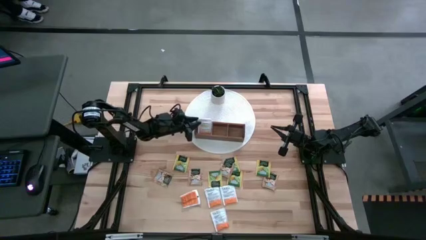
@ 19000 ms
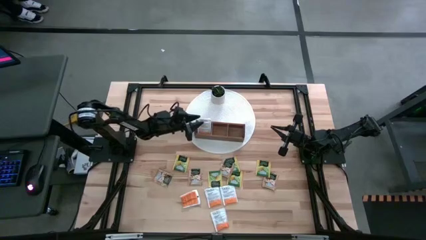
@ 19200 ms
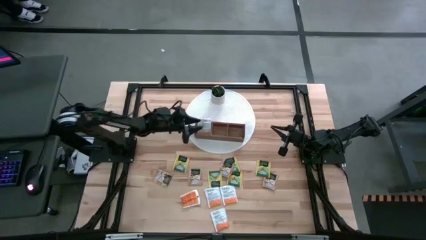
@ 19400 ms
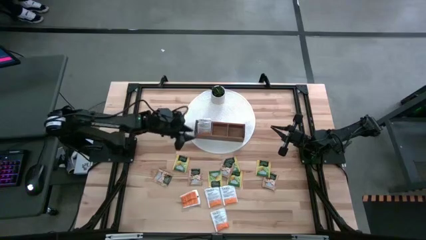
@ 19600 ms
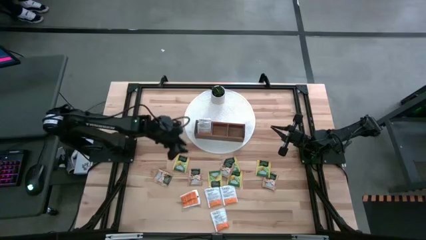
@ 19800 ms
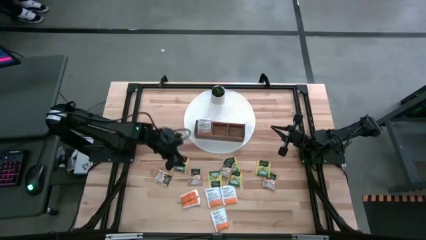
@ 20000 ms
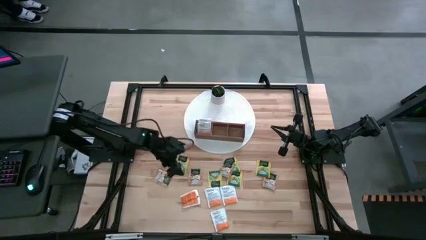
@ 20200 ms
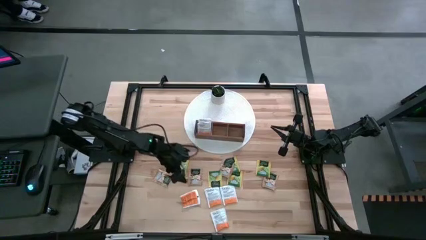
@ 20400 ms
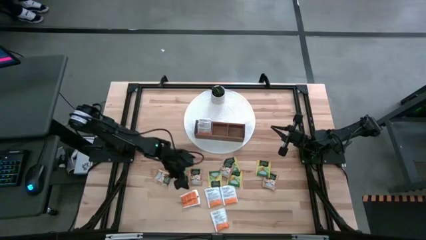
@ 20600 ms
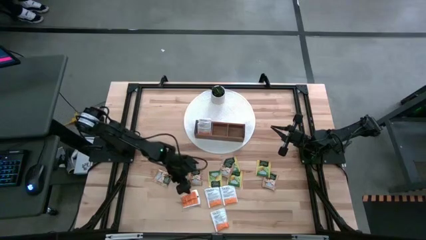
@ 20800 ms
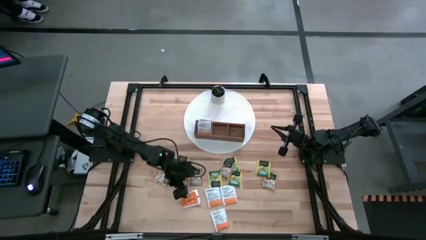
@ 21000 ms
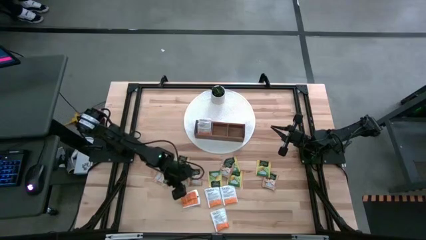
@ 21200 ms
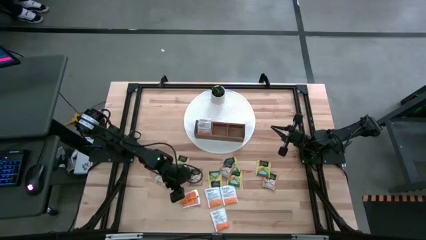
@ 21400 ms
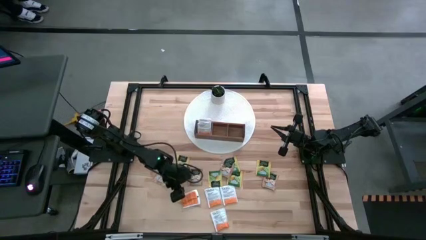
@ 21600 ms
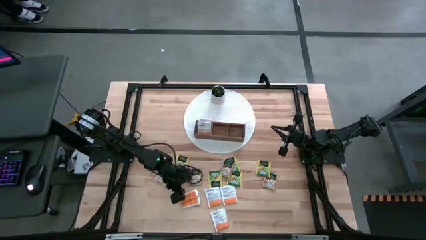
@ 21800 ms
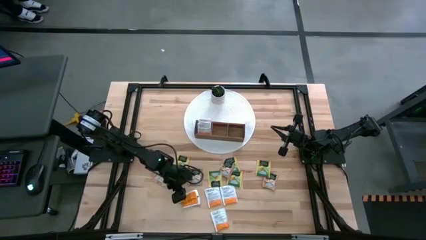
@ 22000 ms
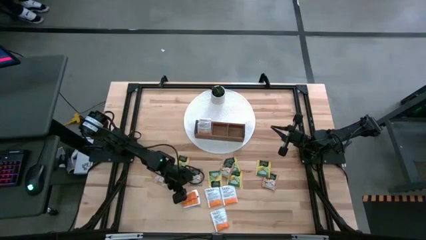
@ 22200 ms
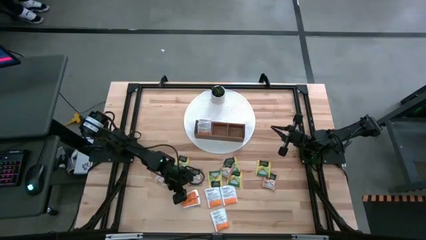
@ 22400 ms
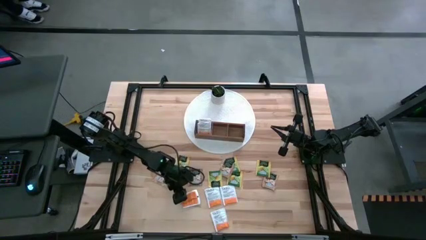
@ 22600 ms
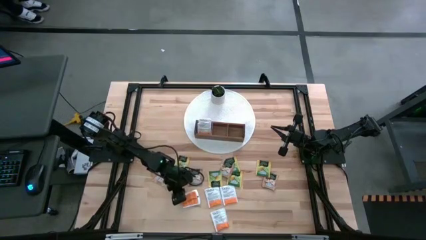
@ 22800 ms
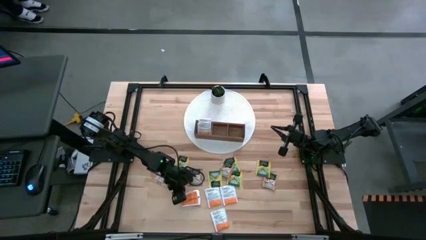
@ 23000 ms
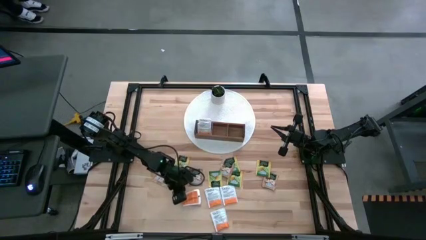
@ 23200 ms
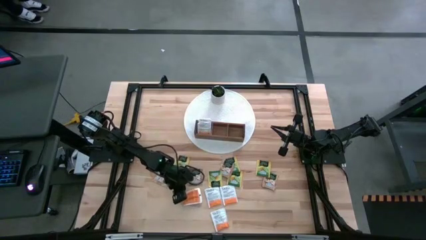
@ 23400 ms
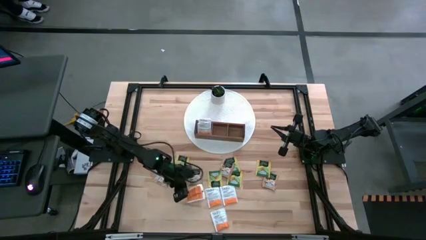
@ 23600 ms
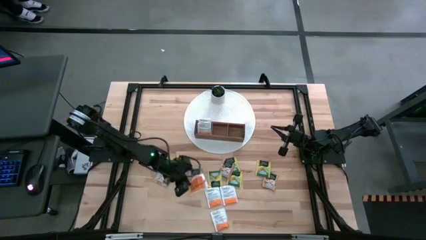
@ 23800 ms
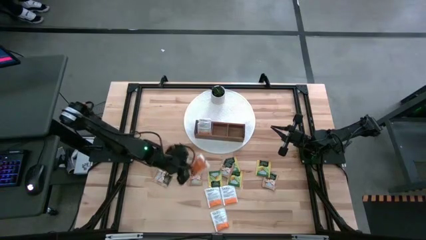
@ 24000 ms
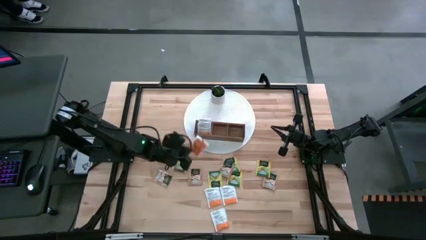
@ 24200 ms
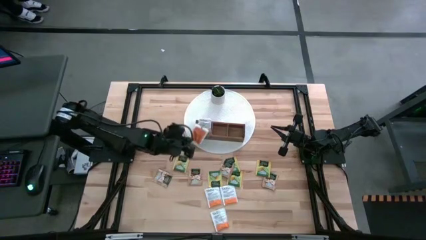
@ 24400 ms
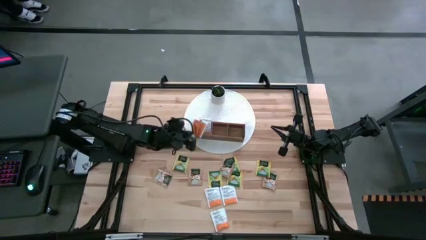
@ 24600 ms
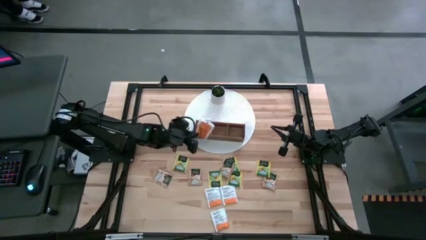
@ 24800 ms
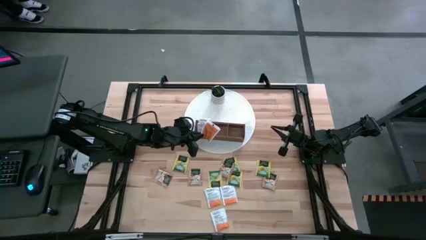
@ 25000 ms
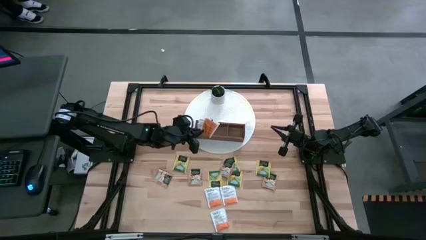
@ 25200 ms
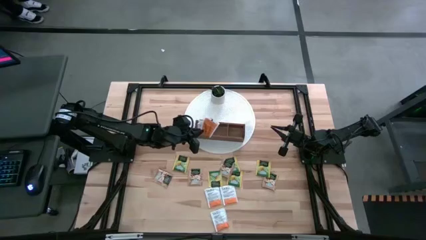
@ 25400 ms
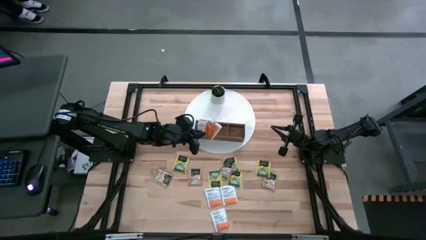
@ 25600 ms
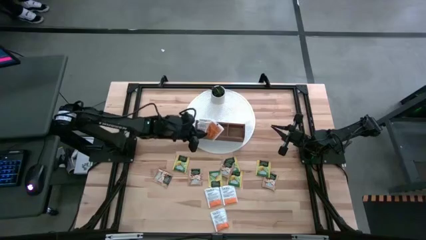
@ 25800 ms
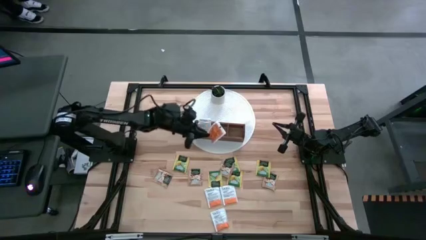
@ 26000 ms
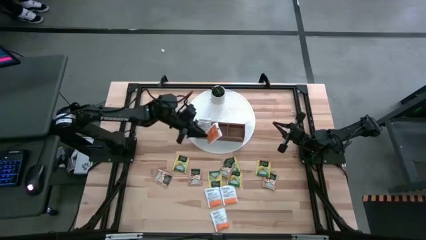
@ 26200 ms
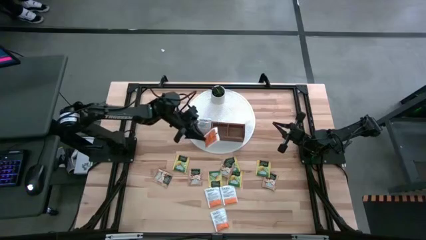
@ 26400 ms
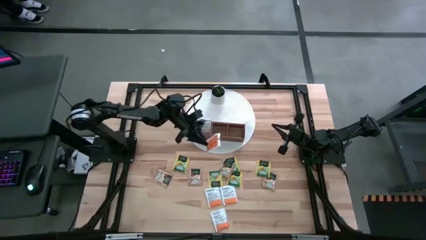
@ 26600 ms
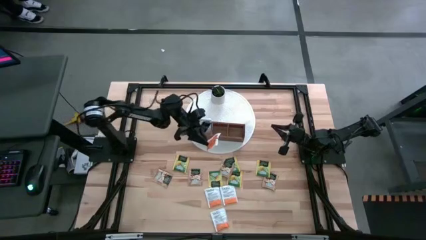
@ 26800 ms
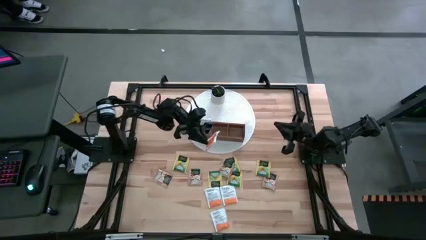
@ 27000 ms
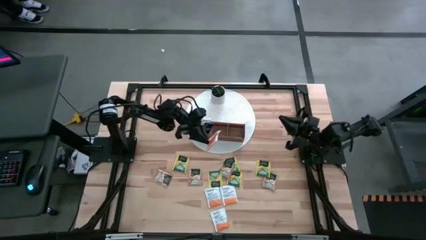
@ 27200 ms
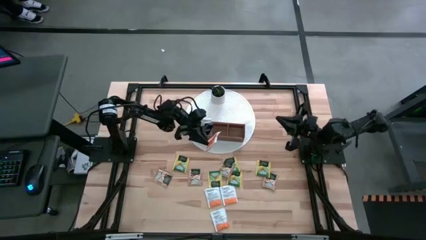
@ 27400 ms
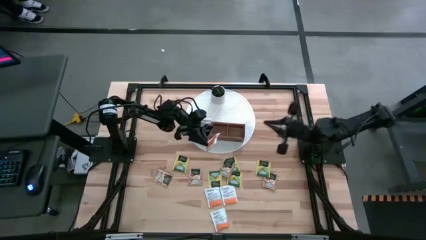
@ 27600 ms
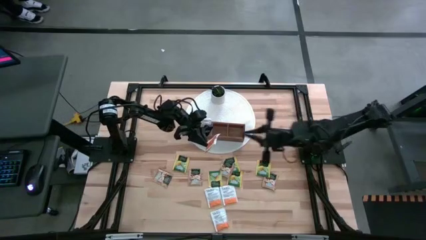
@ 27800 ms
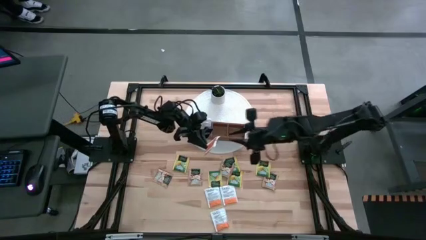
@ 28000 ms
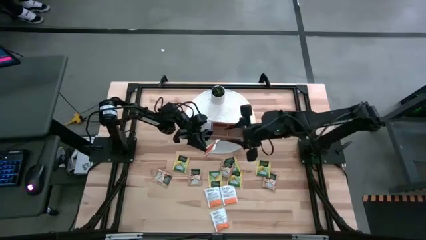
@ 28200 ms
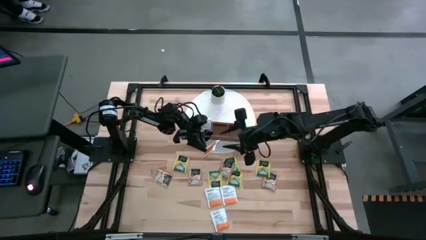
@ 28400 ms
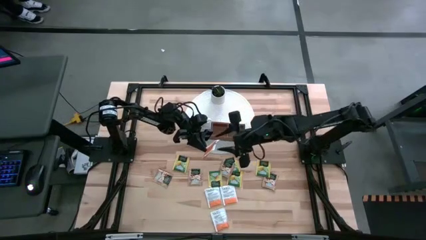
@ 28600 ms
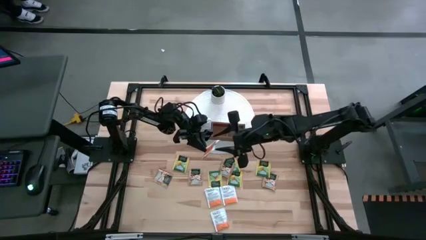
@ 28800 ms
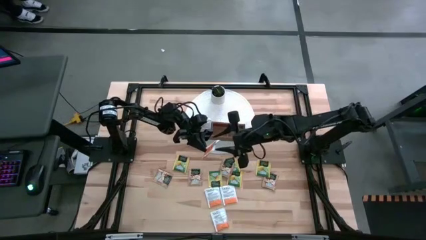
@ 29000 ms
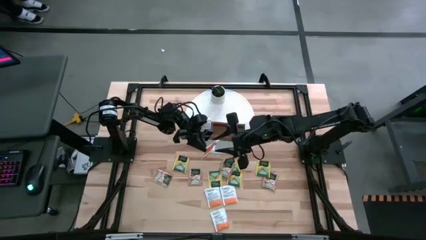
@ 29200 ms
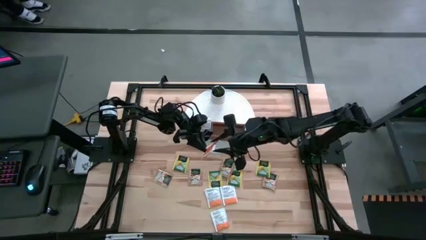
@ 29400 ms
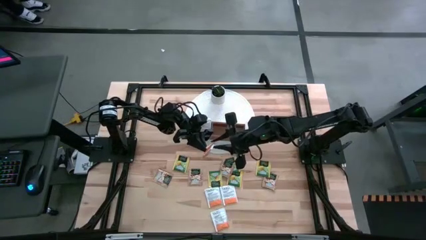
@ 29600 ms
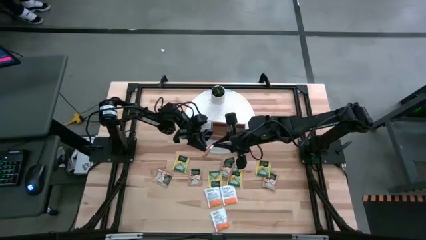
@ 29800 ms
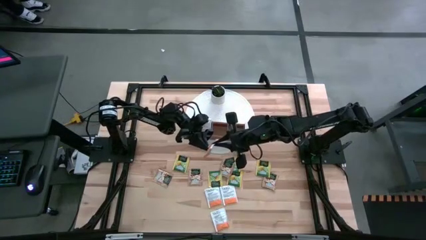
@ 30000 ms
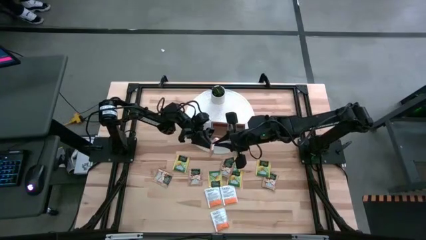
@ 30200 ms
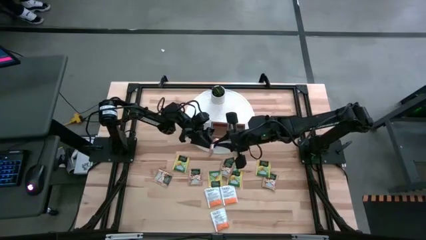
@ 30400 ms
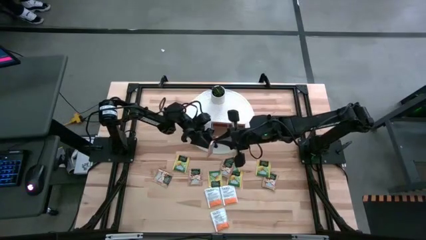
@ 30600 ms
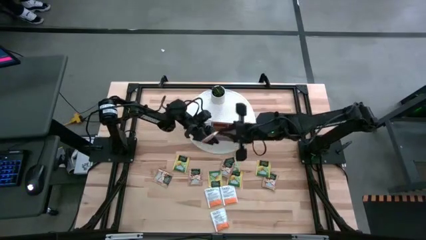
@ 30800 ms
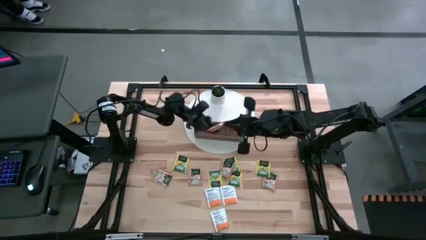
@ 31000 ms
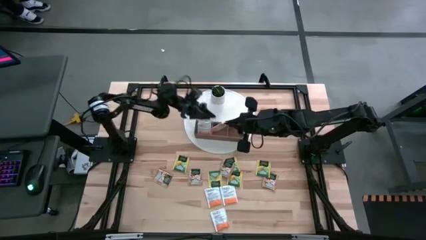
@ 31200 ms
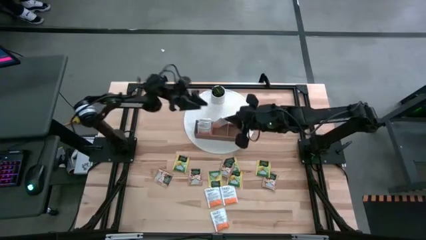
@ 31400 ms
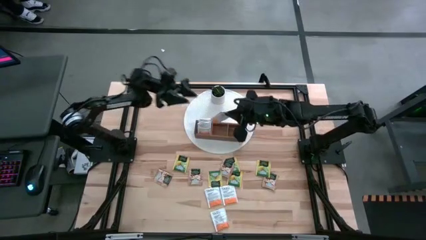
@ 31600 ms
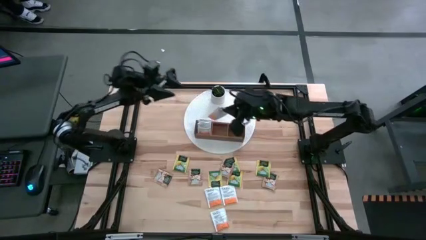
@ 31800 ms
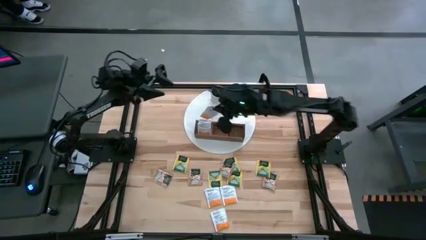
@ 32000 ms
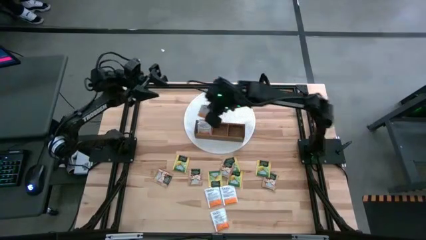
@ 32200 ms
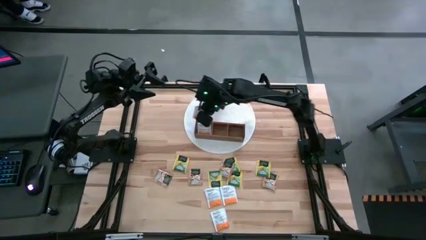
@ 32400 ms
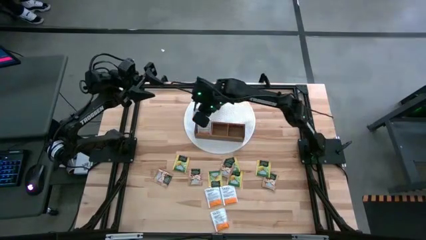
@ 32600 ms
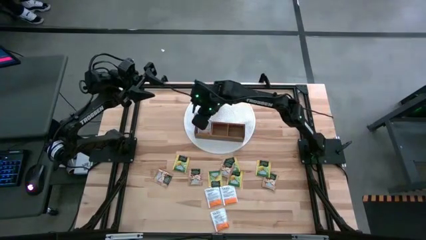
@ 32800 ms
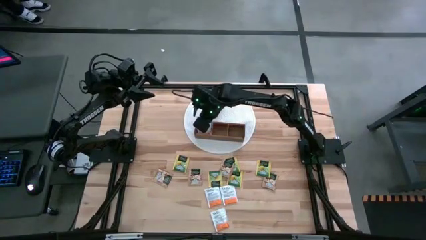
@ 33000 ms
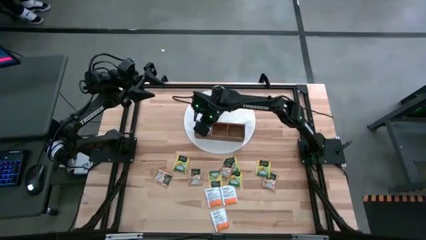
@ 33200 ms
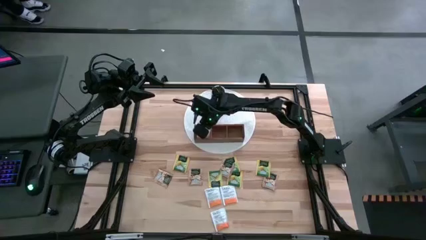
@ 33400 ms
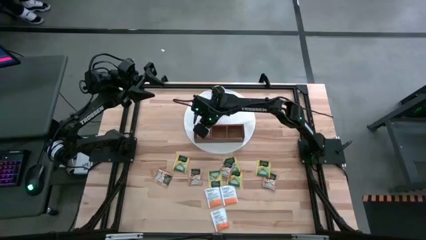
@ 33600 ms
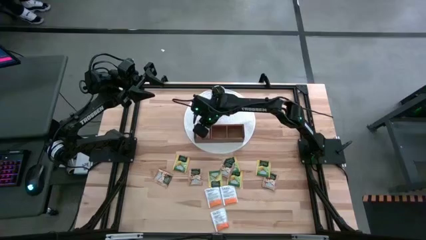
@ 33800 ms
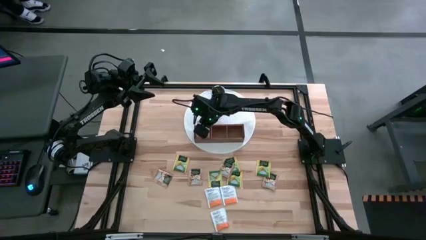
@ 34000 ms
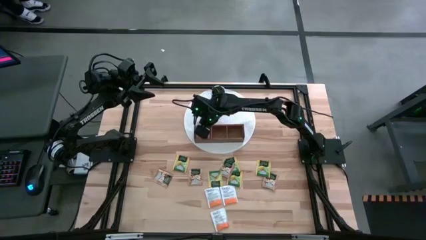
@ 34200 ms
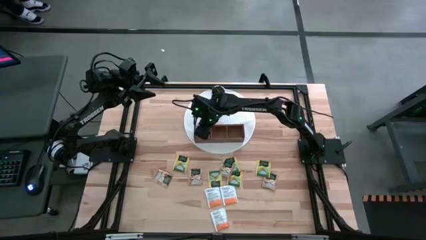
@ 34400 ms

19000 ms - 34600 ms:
Task: Pick & Place Tea
Put the white tea bag into the left section of the wooden organizer
